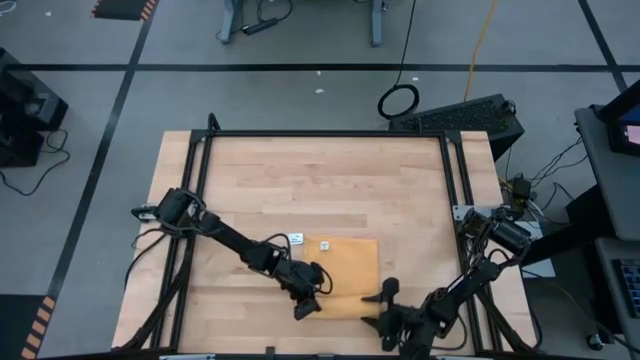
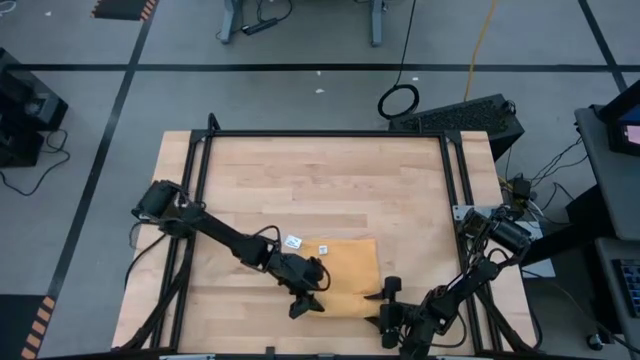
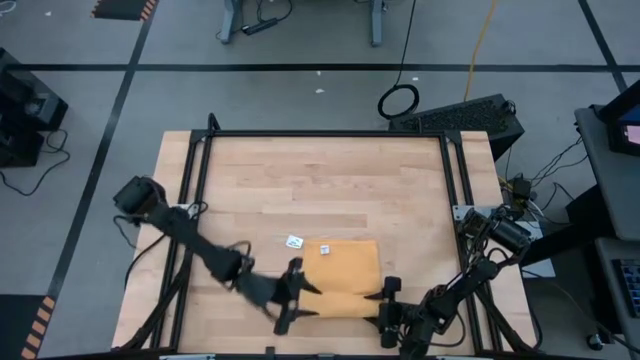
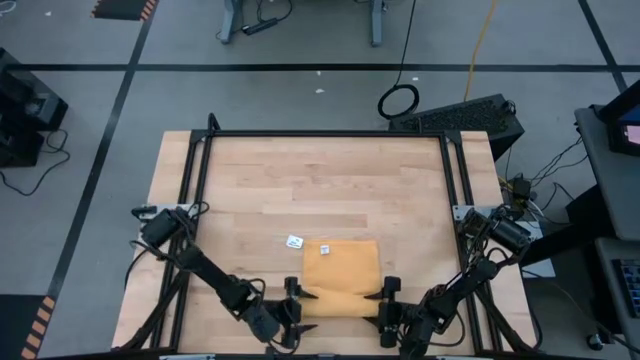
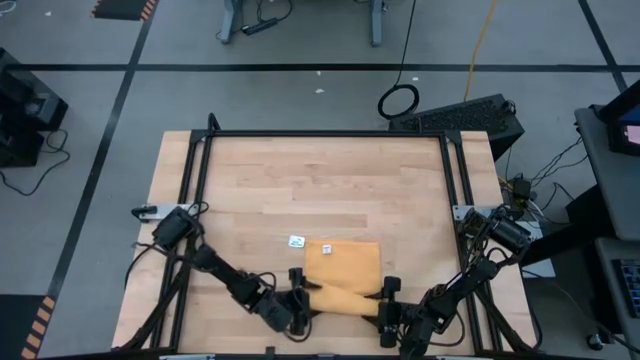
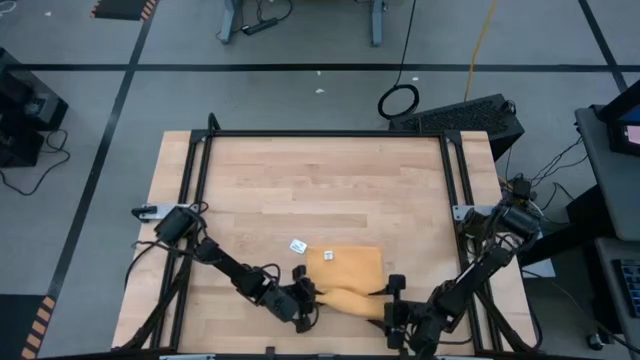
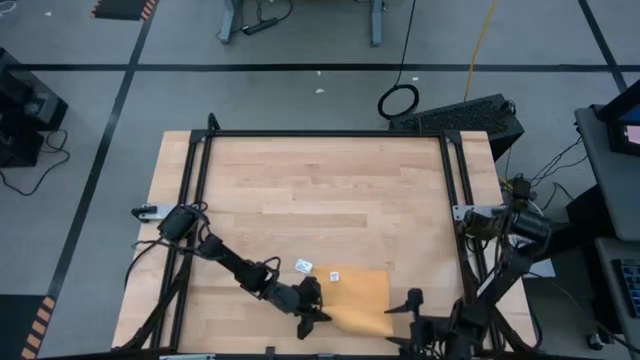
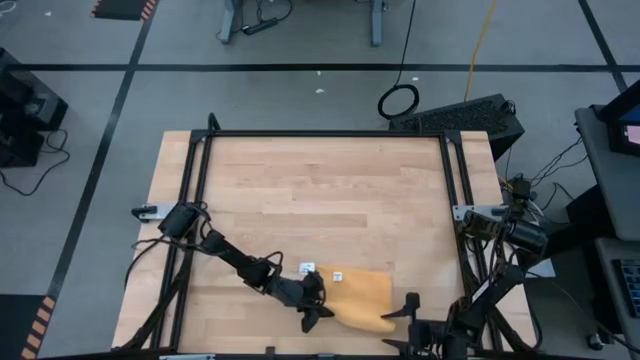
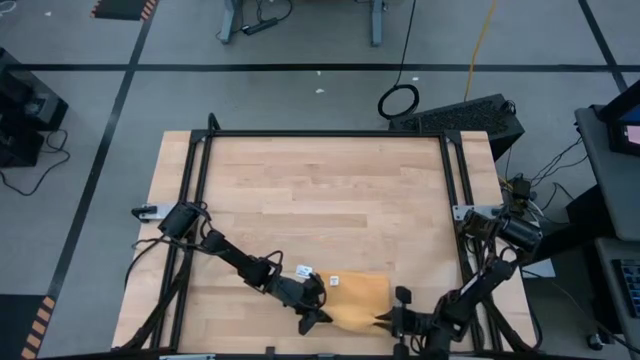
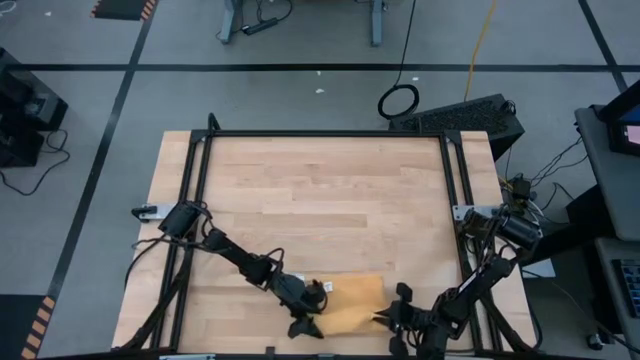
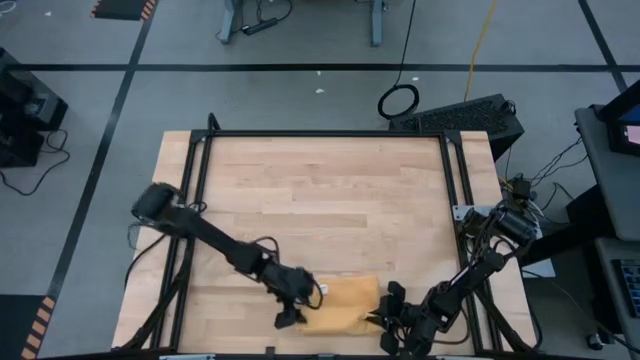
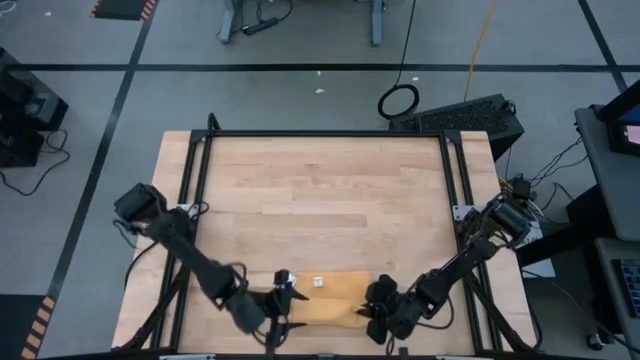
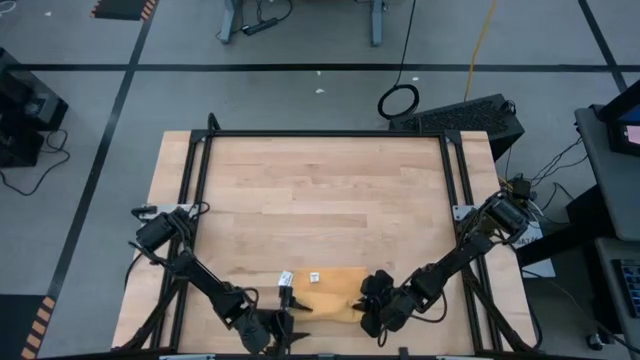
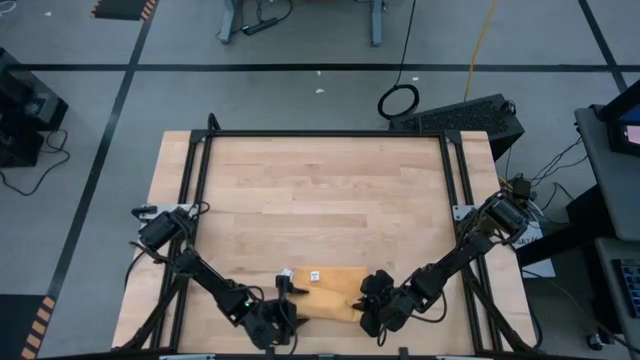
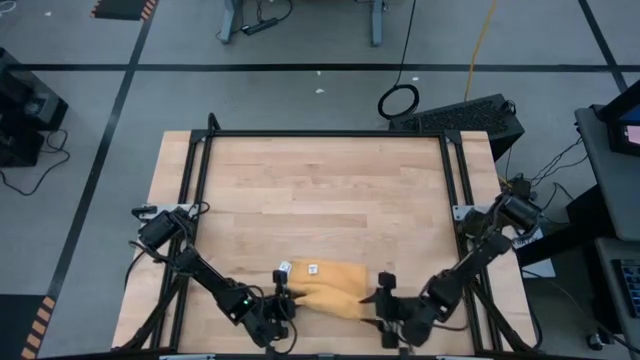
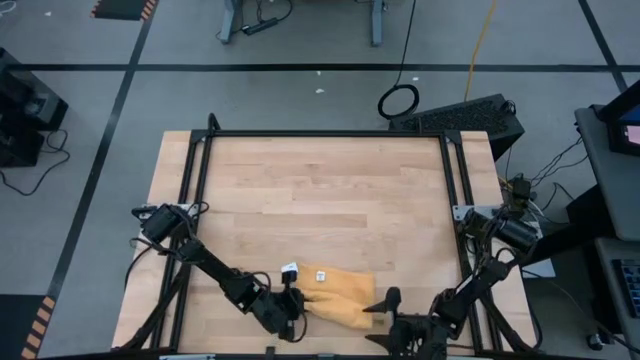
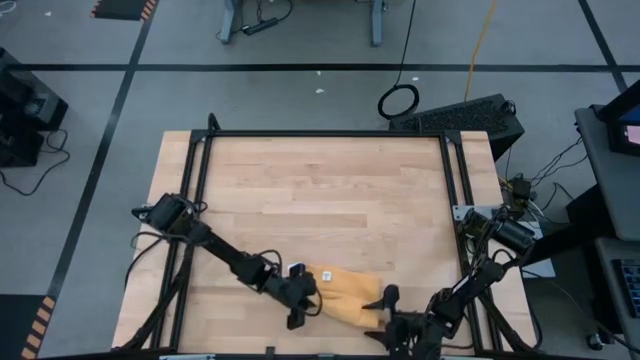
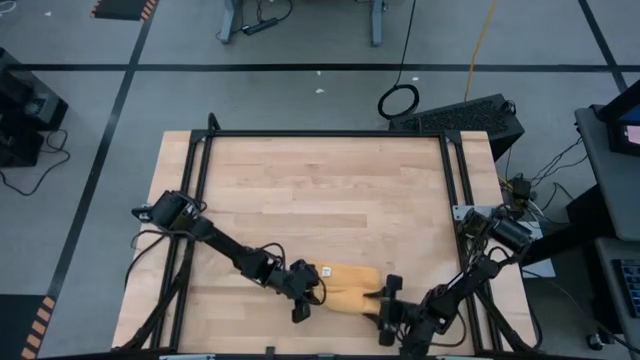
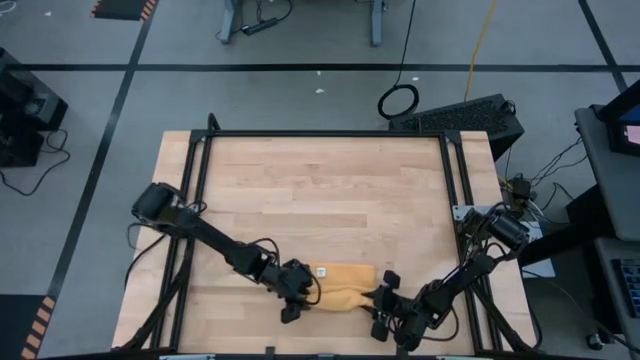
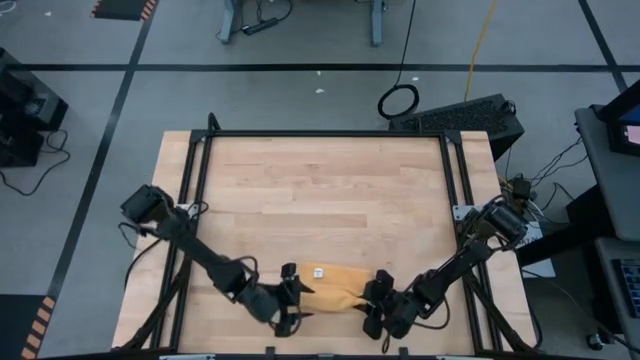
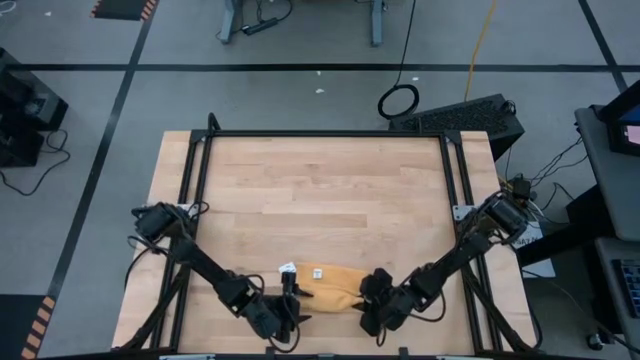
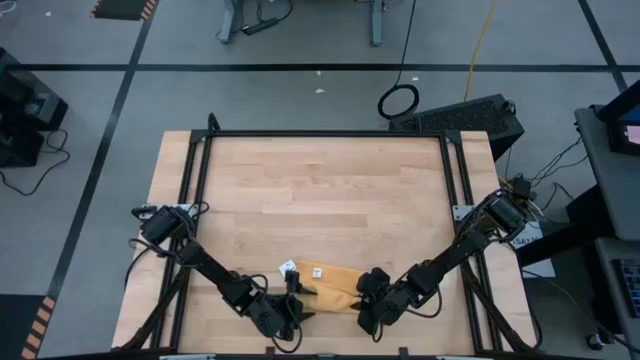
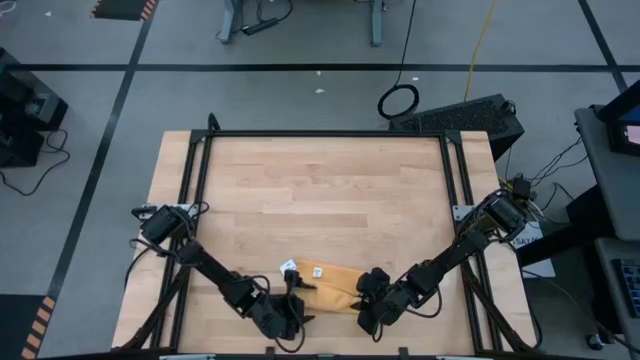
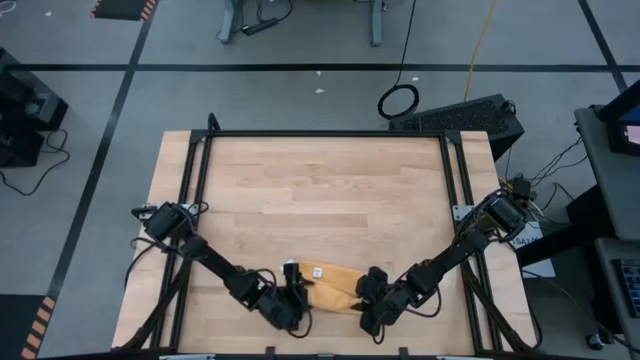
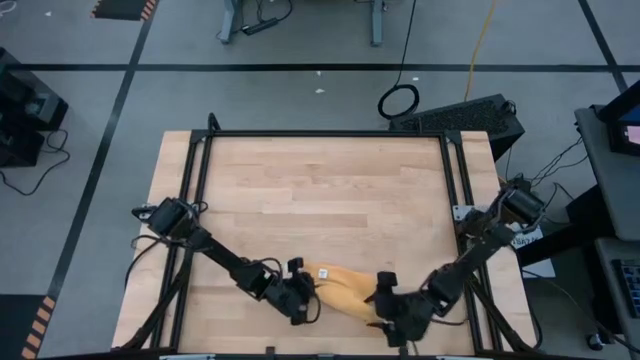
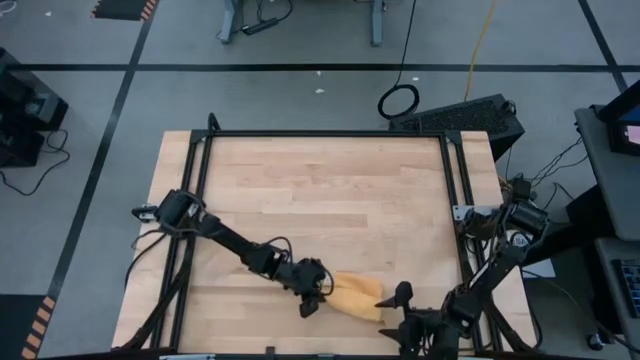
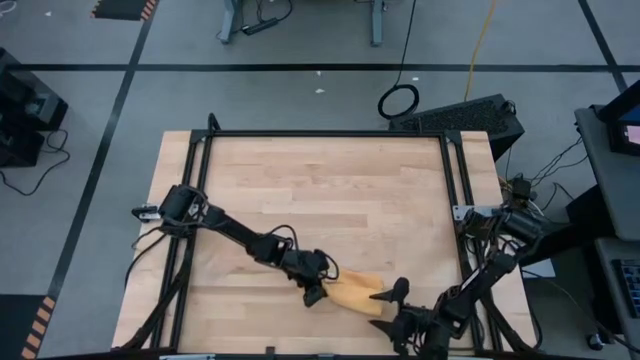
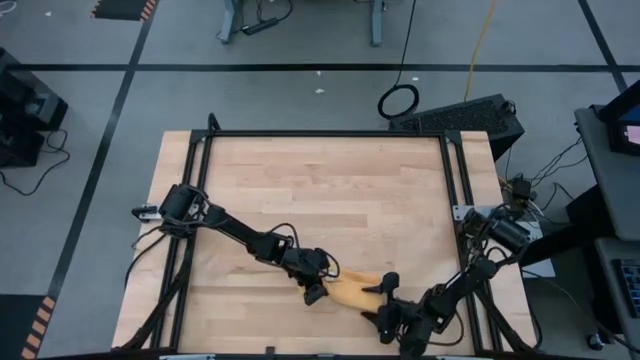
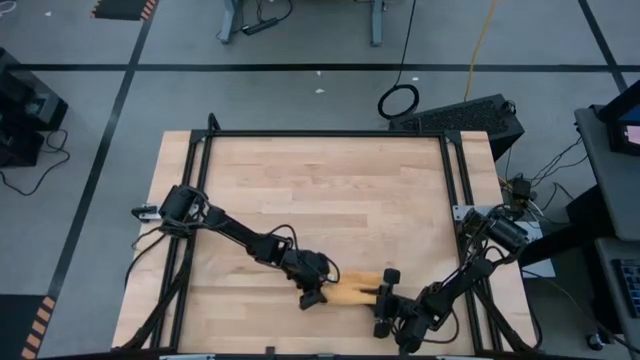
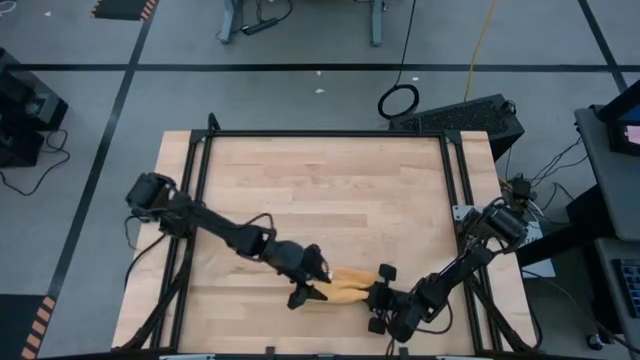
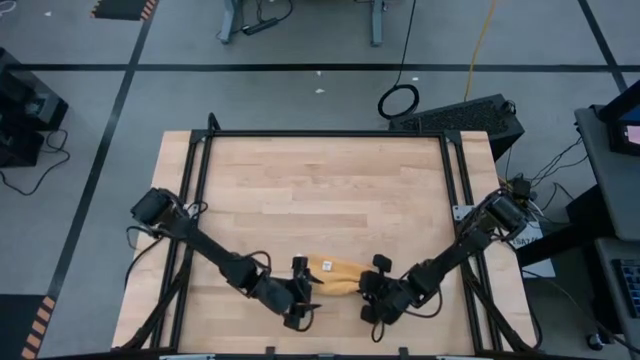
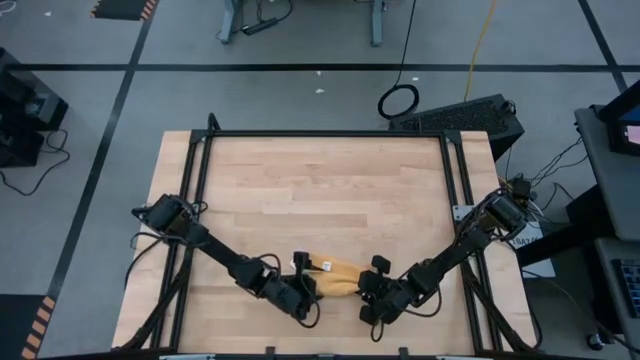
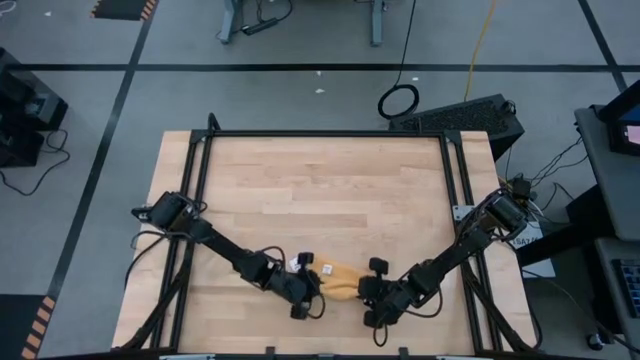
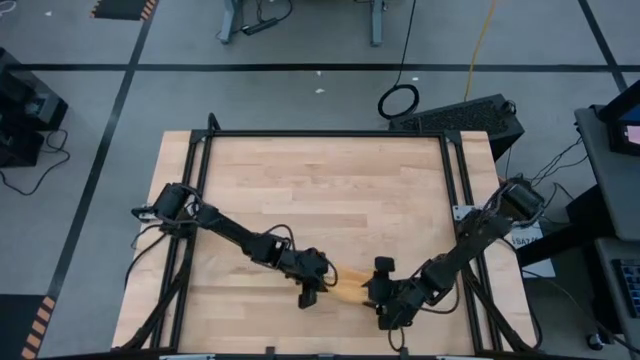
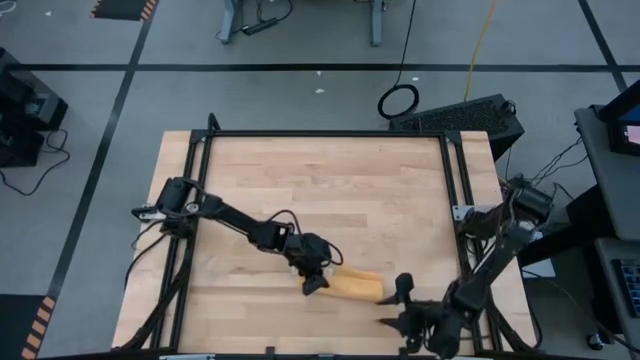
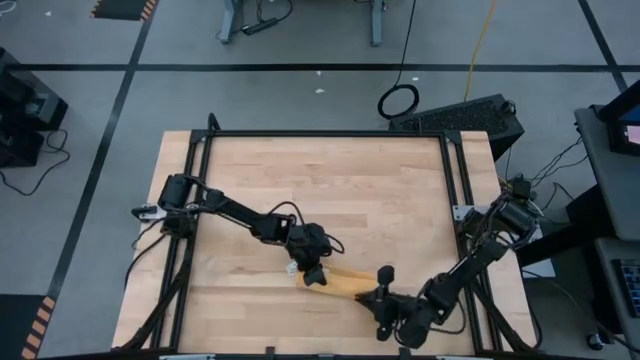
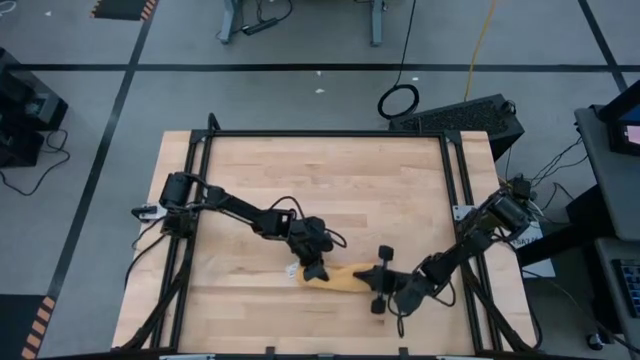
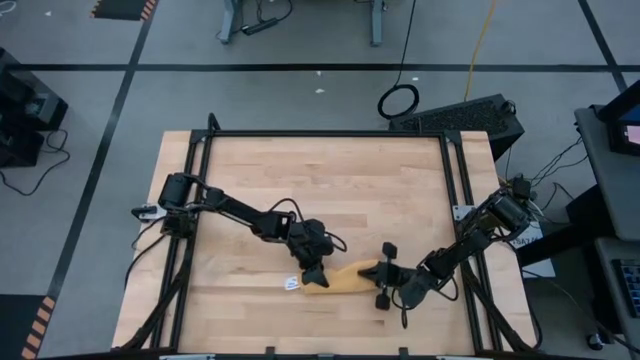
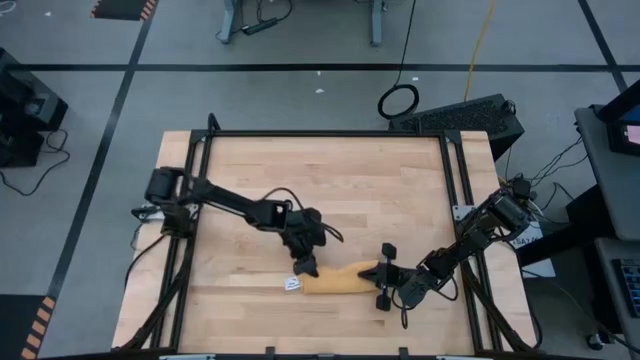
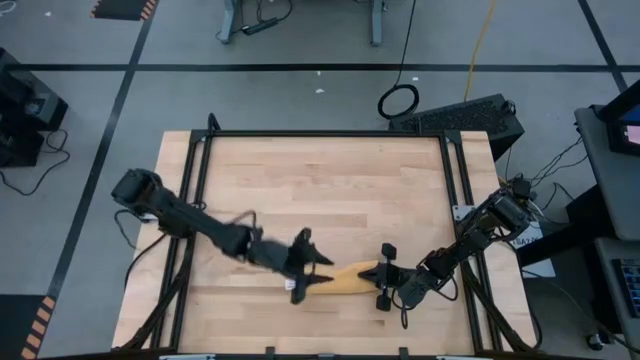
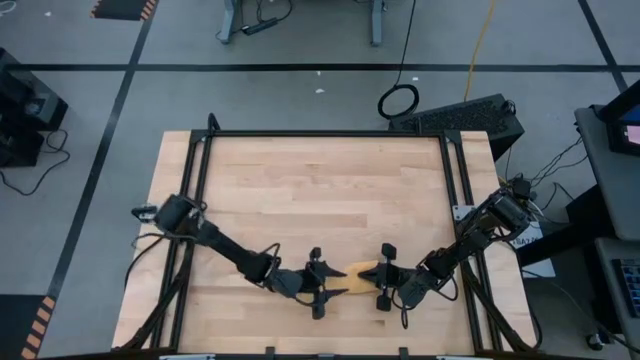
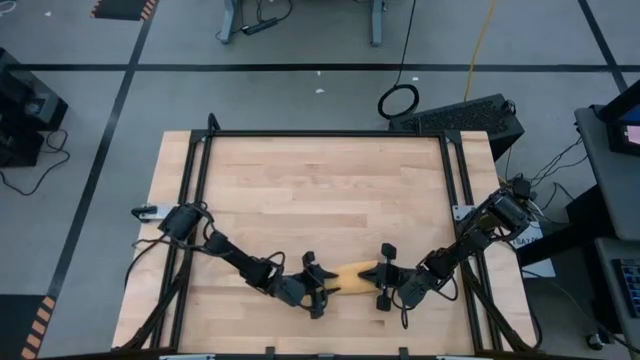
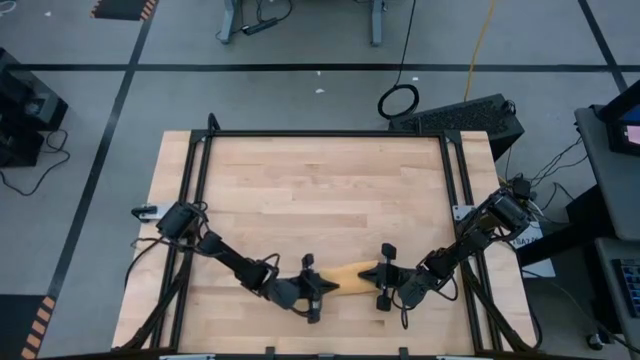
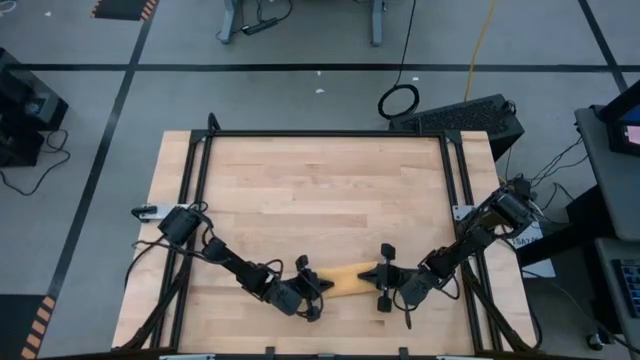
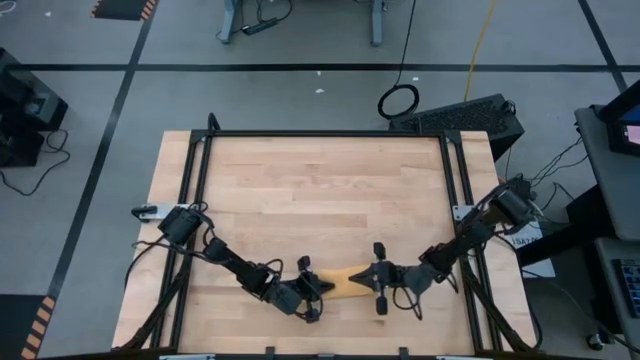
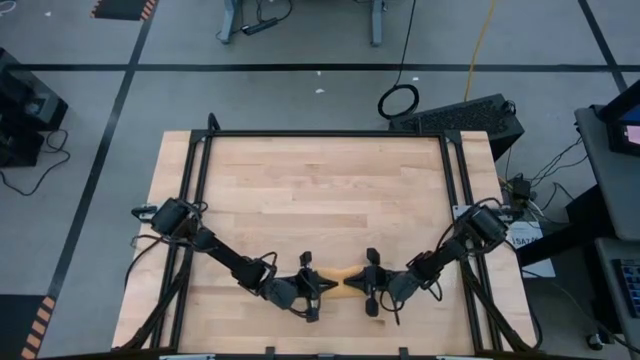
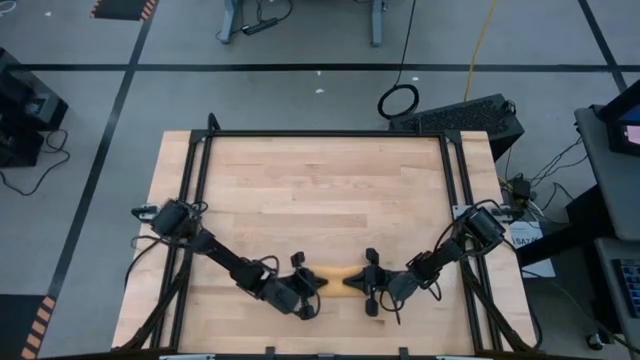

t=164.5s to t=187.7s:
Task: Roll towel into tight, uniform cylinder
Roll the orange towel
